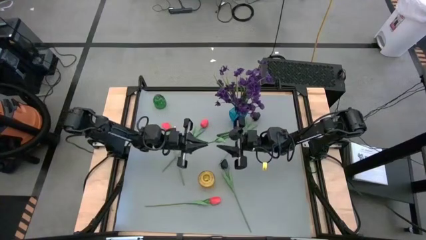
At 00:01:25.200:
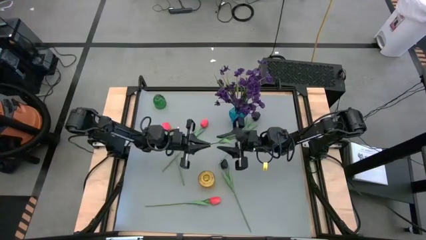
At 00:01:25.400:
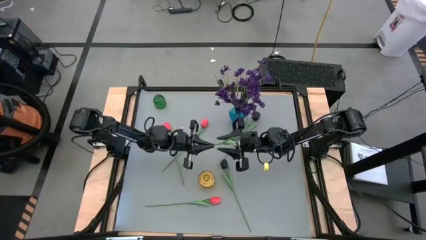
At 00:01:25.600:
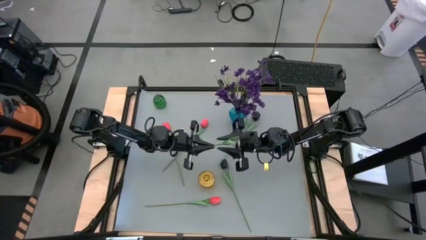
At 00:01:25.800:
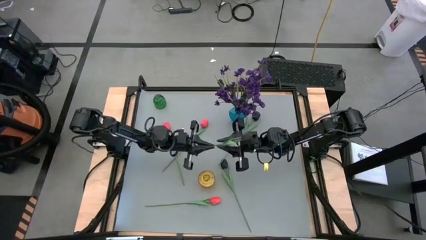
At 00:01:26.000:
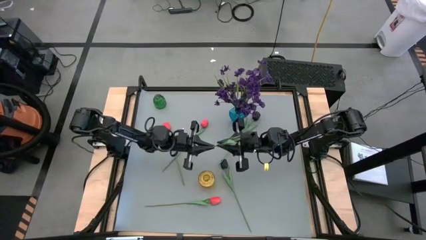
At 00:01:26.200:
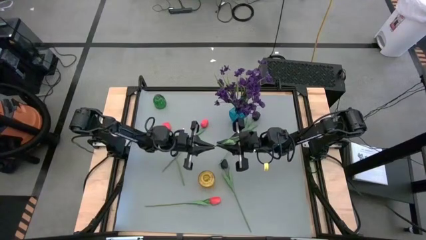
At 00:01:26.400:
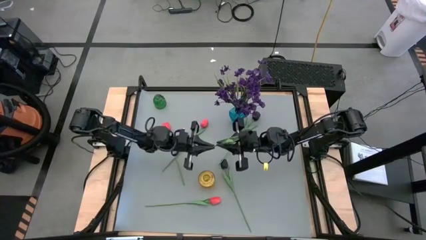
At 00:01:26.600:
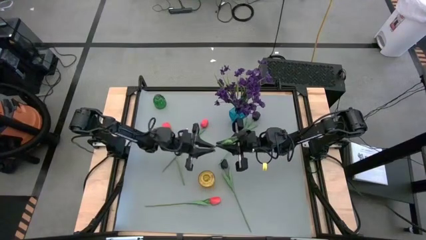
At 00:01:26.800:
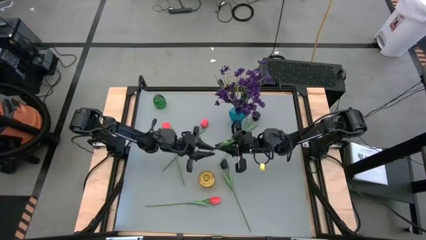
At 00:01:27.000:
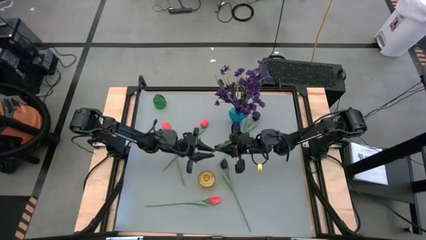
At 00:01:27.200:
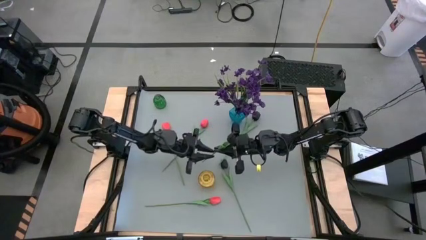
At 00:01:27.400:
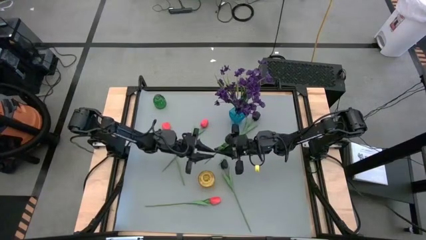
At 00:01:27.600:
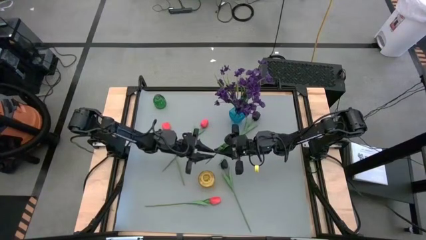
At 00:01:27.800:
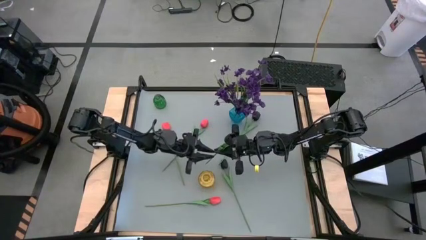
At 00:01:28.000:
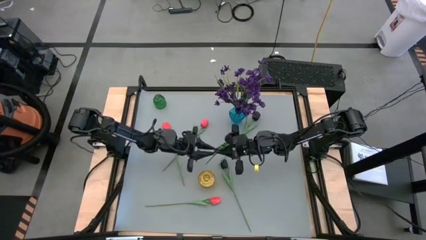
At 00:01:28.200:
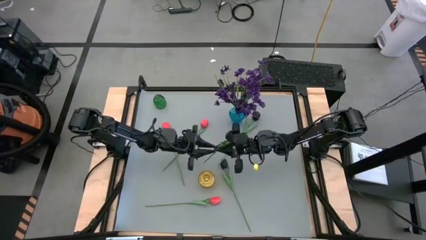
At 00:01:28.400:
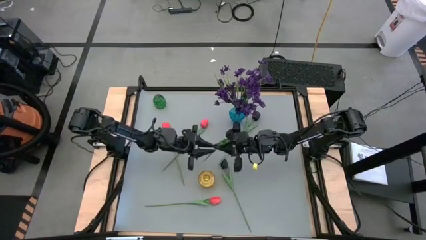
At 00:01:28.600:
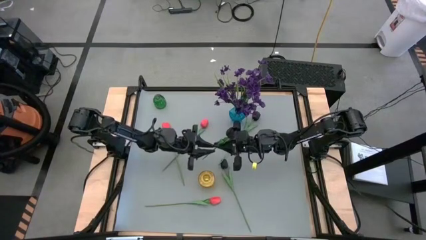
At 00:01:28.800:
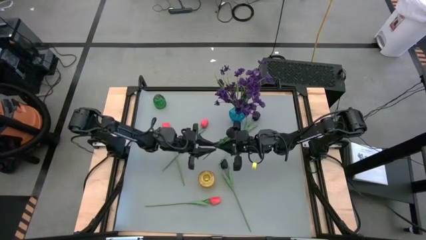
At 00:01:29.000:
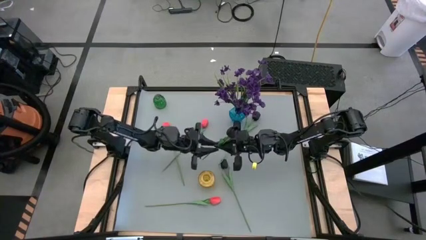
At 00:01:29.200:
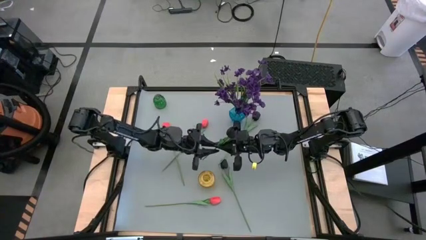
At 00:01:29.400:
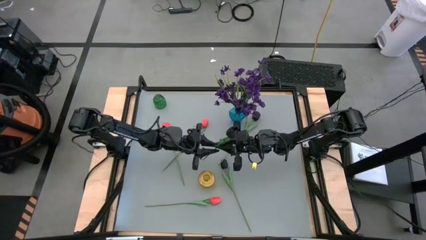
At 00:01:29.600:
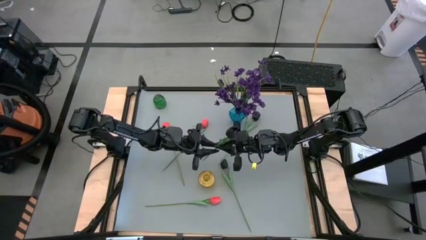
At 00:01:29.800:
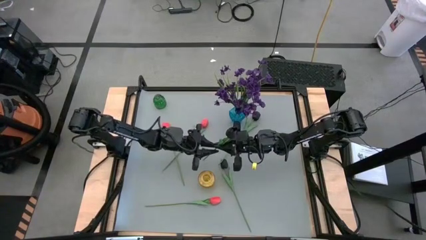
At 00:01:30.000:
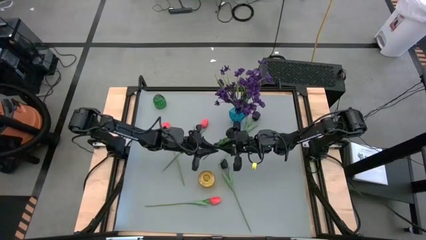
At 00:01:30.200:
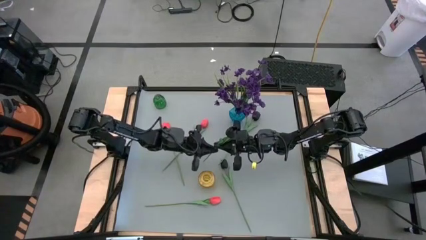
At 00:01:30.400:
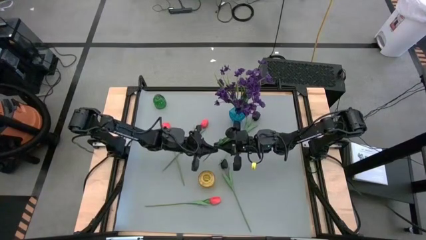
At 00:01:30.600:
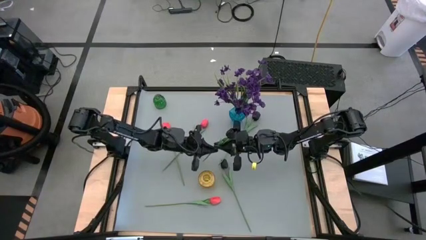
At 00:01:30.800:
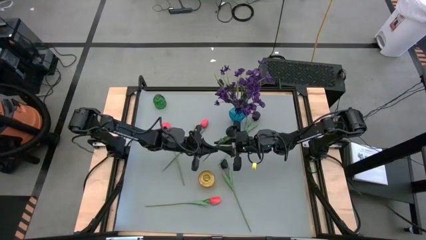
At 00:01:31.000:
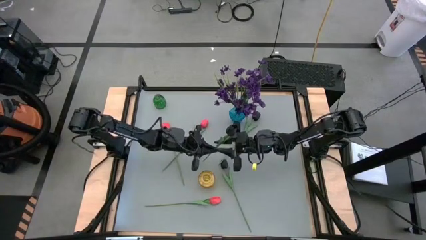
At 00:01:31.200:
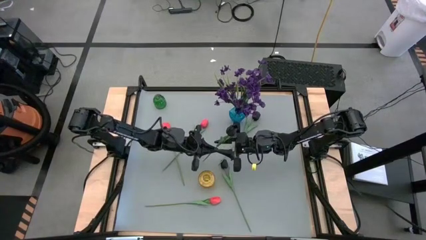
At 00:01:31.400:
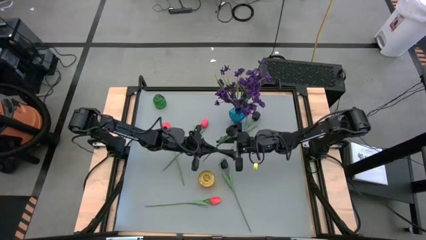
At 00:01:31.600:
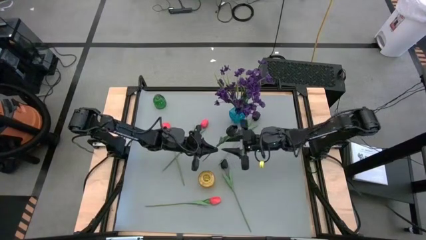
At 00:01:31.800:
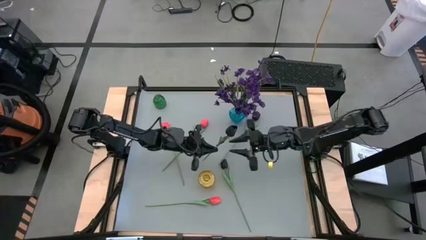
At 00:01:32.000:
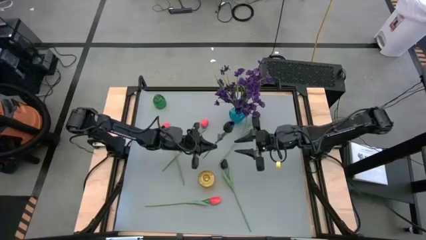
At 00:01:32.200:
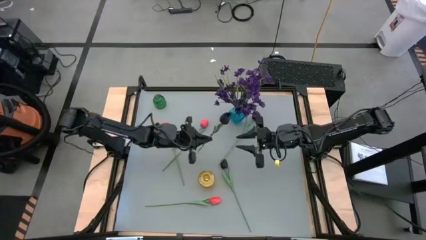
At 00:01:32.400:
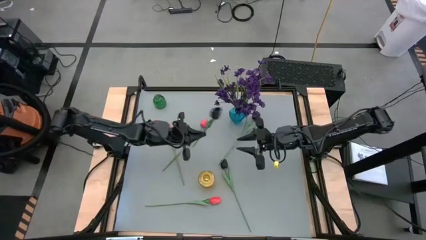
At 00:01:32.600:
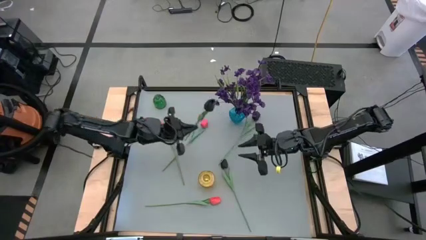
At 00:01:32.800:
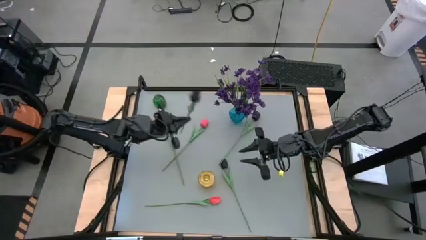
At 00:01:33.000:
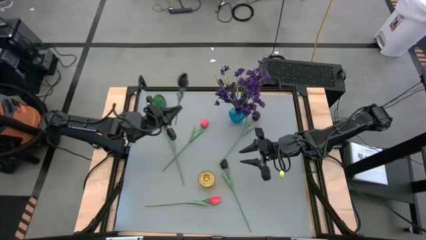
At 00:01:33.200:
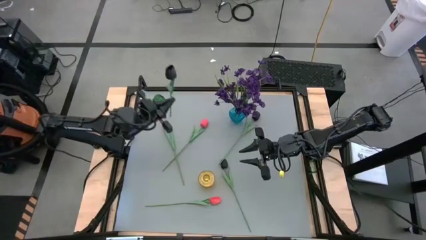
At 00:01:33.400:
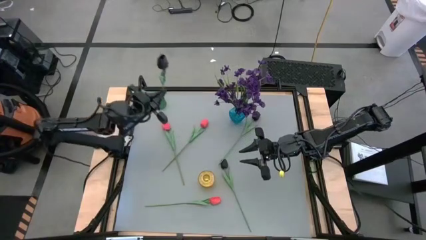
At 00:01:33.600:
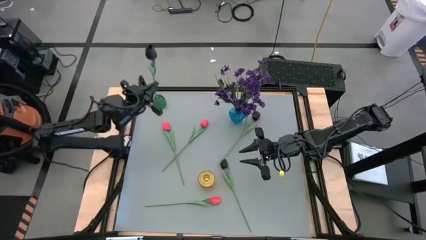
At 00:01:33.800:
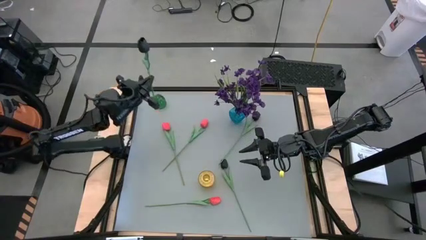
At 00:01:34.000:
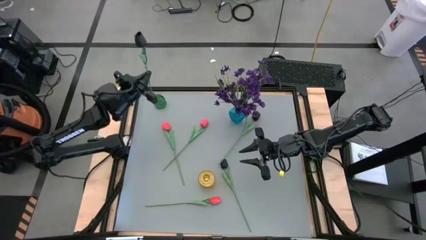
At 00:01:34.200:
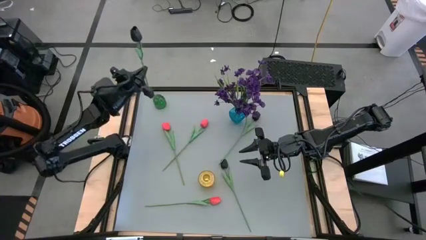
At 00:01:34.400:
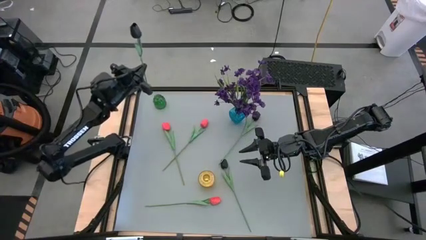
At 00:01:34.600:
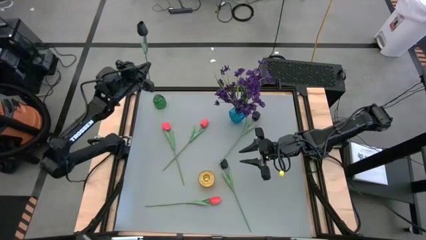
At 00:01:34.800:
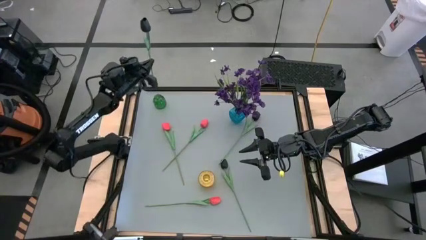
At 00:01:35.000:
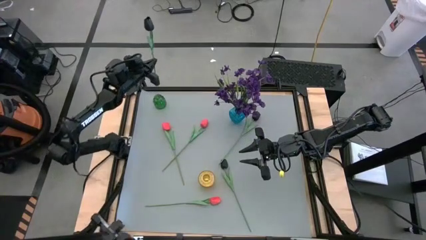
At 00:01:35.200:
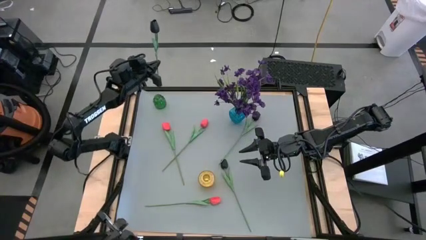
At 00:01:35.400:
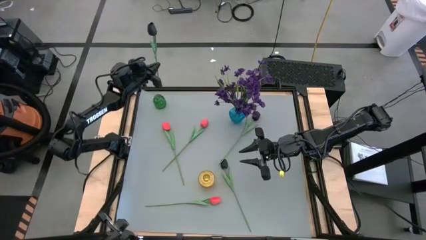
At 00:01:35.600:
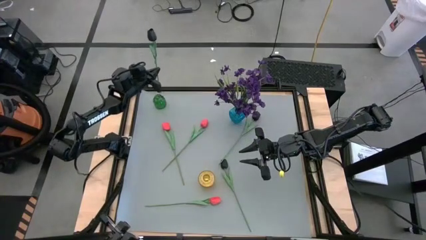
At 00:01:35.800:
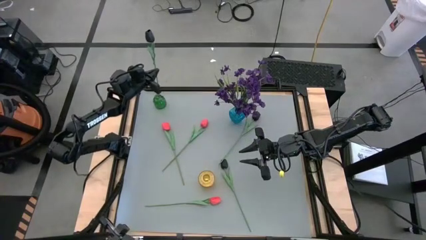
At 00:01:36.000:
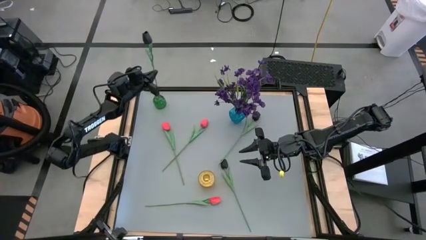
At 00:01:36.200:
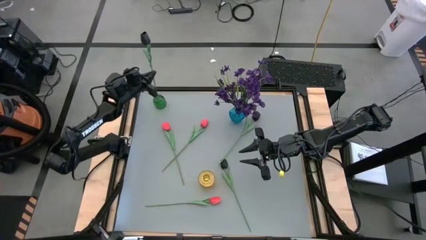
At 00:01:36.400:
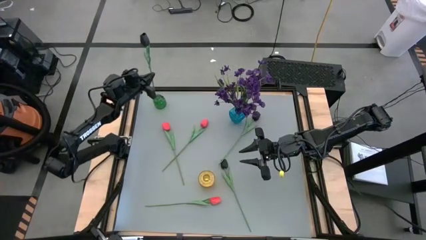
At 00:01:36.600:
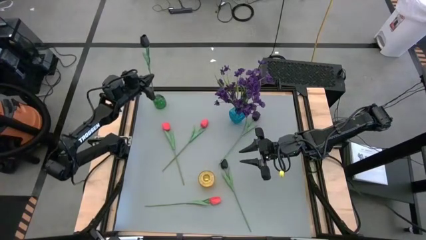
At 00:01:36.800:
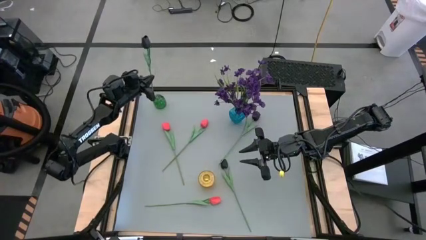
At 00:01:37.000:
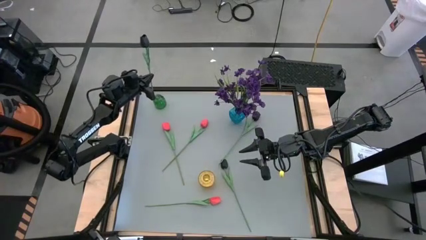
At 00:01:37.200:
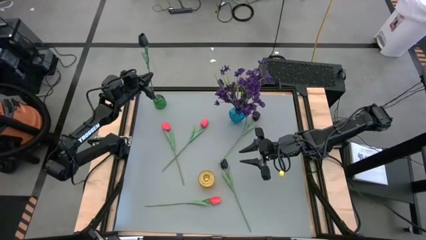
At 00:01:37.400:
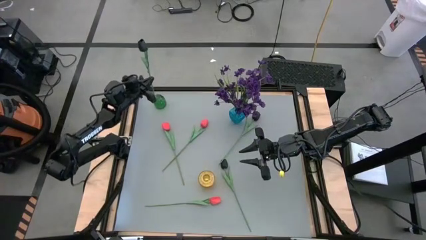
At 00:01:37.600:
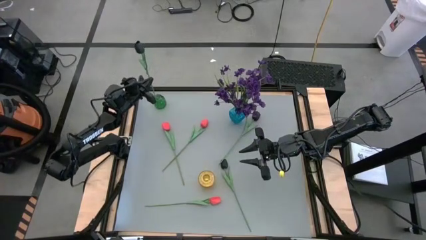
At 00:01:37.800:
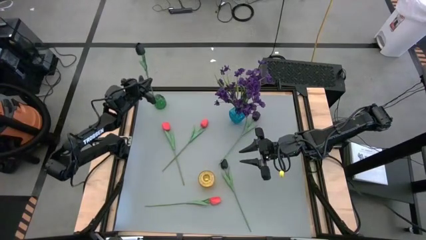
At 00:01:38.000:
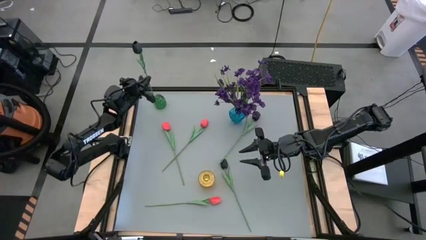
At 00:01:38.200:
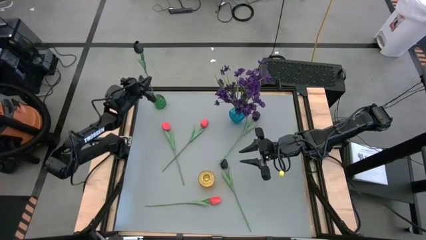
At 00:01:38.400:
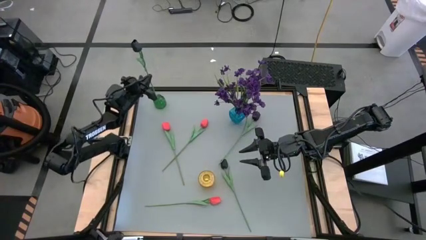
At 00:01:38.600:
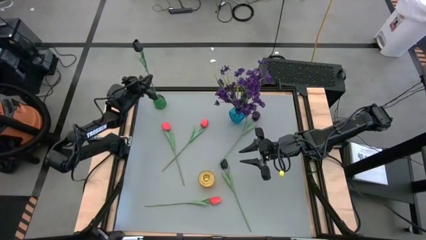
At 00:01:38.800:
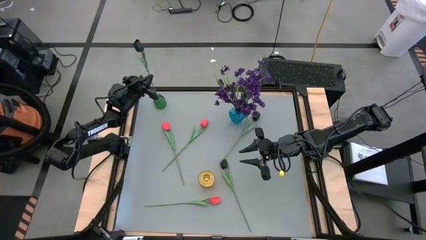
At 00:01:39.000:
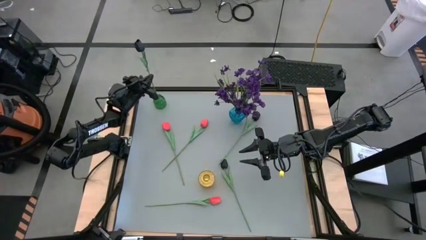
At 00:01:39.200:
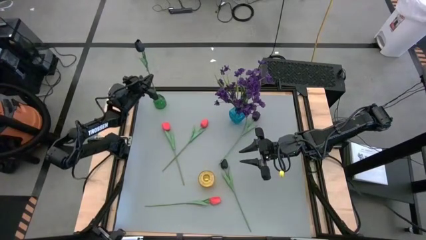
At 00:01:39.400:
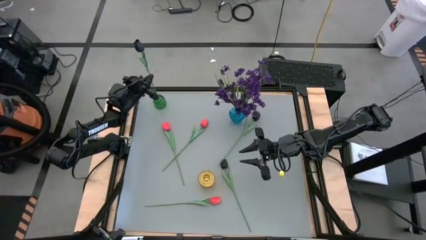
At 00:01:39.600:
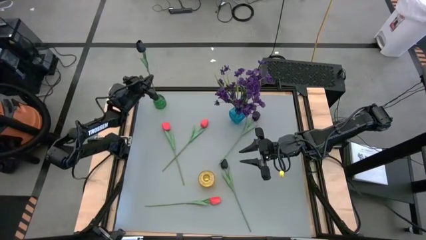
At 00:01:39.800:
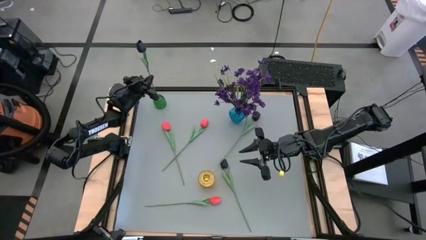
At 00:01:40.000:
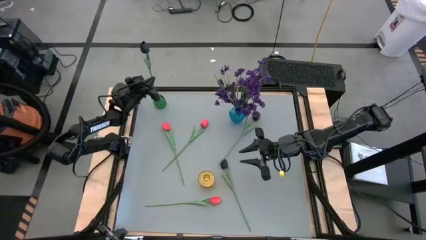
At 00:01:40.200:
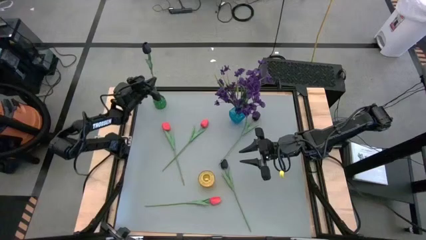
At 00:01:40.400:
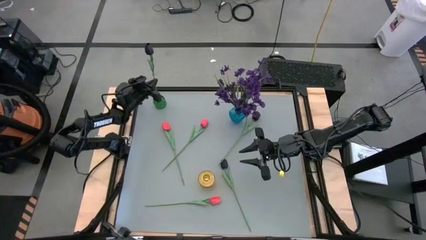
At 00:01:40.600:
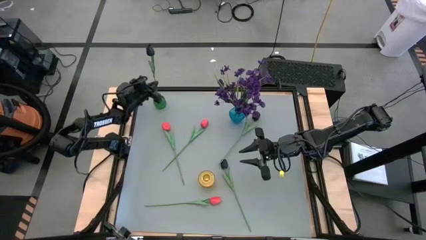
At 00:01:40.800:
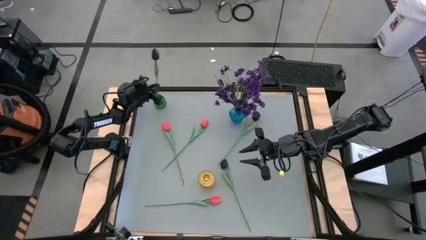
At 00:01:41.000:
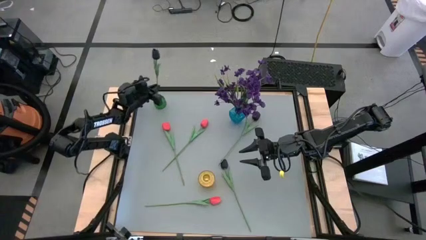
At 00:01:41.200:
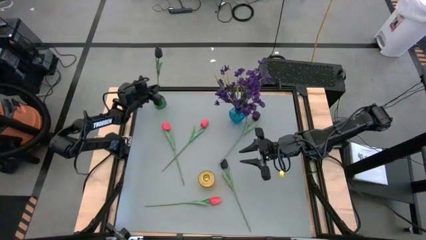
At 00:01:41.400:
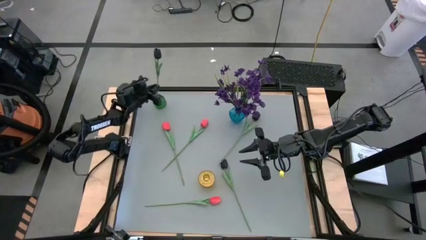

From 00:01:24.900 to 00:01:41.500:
Task: Sort flowers into vase by color
Put the bottom right black flower into the green vase
